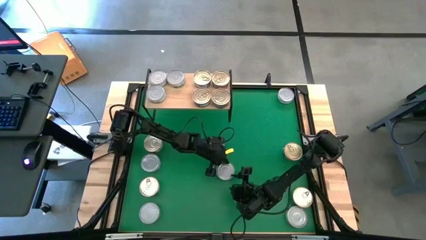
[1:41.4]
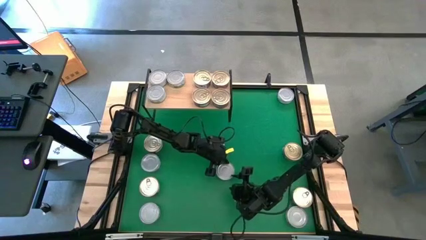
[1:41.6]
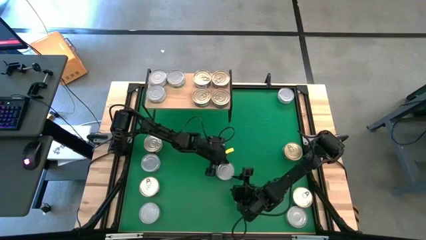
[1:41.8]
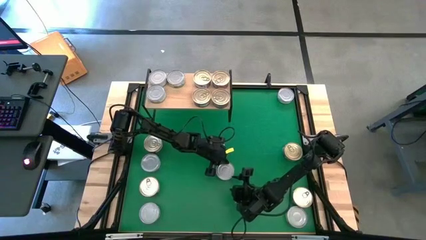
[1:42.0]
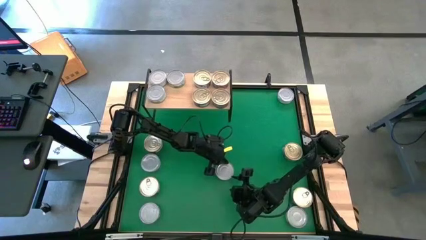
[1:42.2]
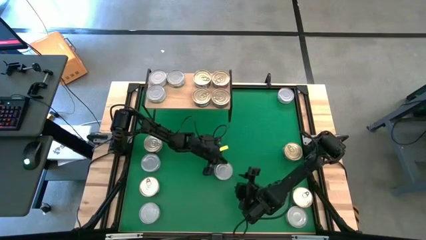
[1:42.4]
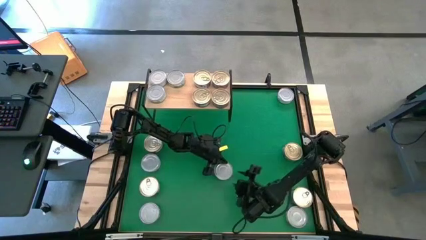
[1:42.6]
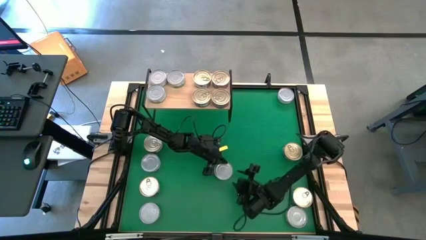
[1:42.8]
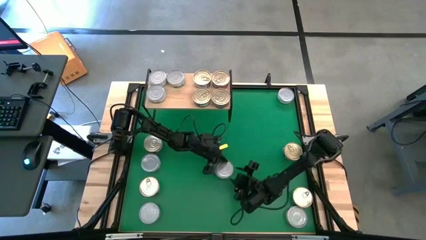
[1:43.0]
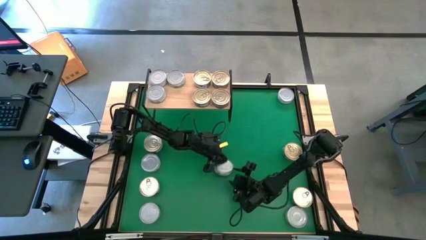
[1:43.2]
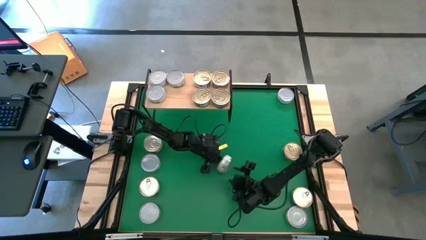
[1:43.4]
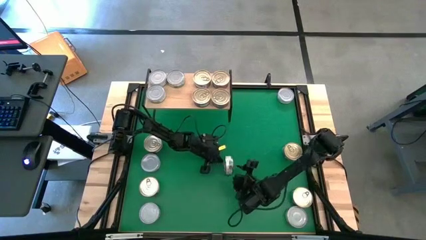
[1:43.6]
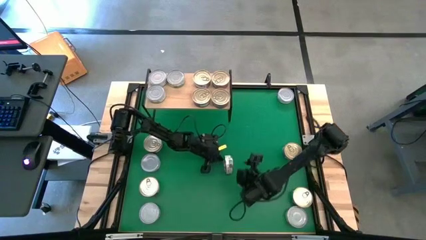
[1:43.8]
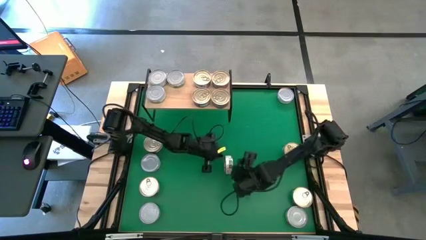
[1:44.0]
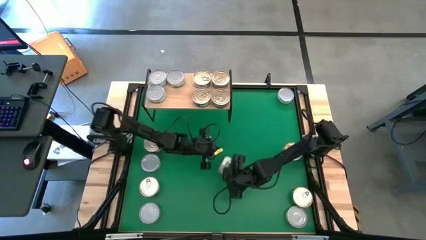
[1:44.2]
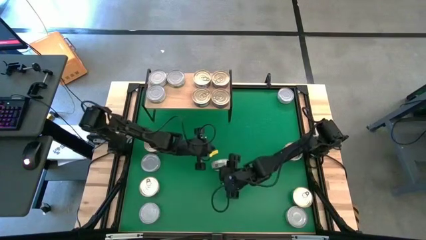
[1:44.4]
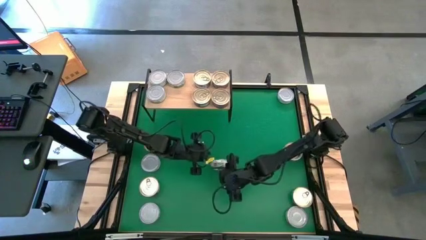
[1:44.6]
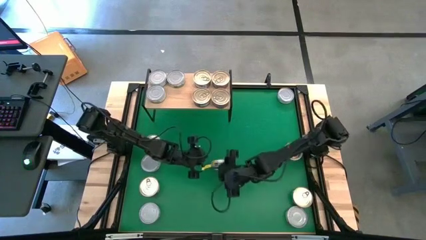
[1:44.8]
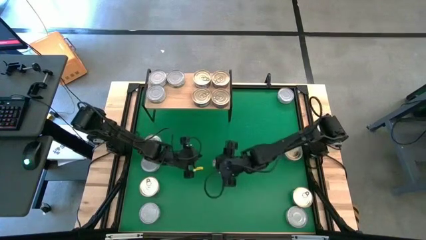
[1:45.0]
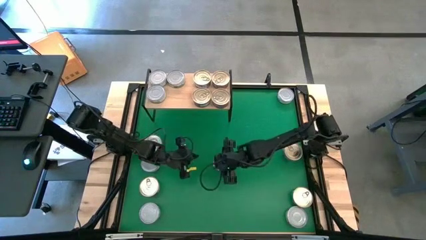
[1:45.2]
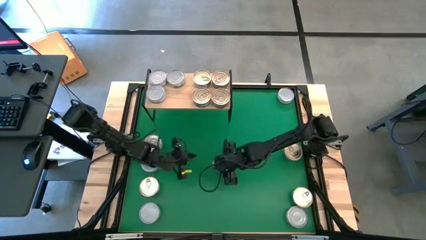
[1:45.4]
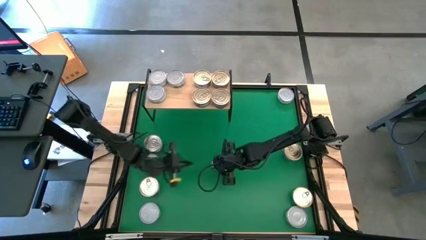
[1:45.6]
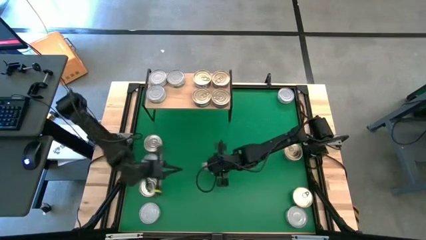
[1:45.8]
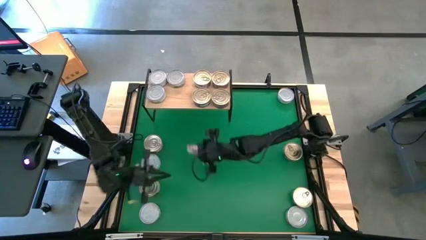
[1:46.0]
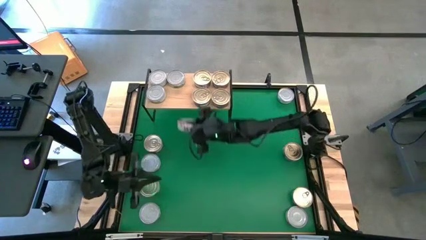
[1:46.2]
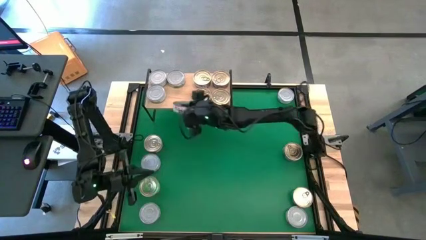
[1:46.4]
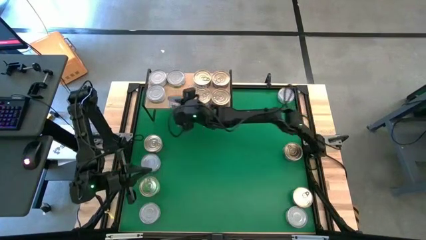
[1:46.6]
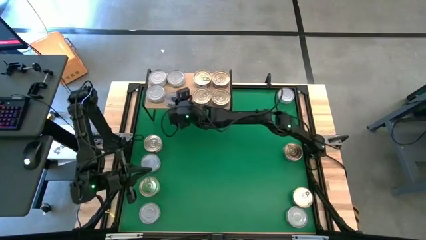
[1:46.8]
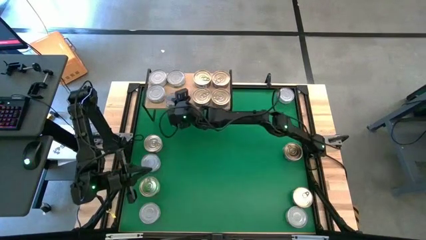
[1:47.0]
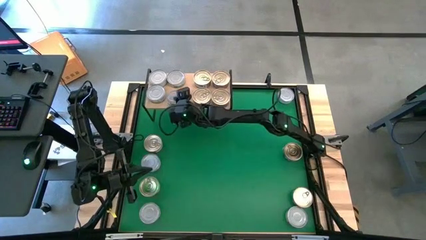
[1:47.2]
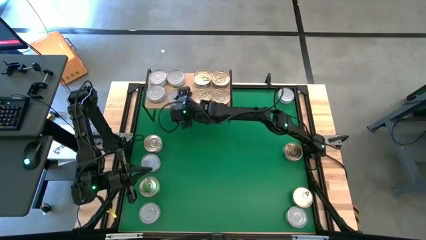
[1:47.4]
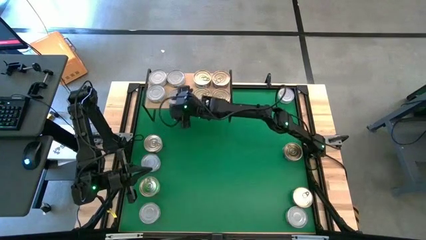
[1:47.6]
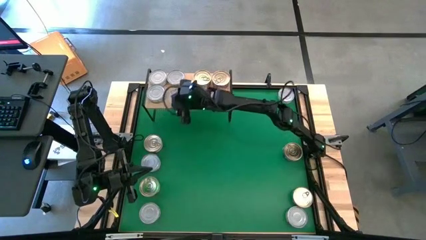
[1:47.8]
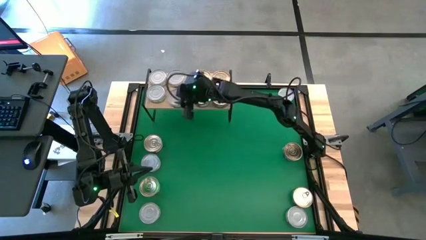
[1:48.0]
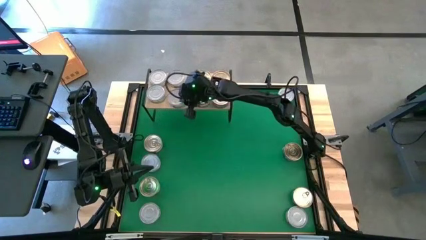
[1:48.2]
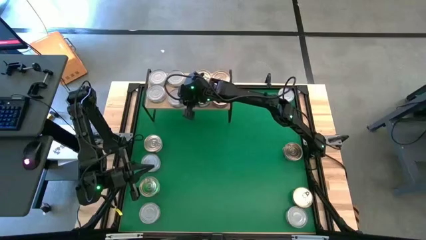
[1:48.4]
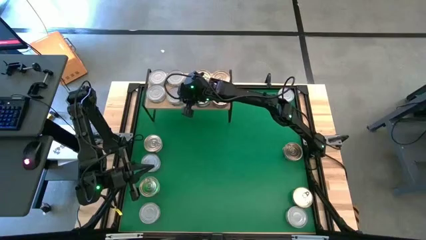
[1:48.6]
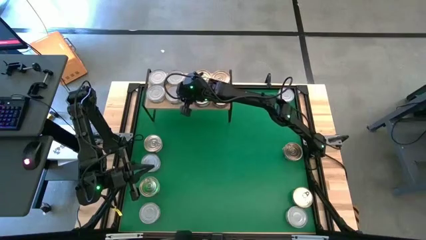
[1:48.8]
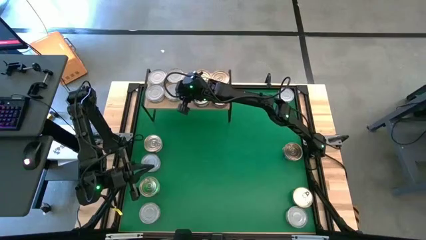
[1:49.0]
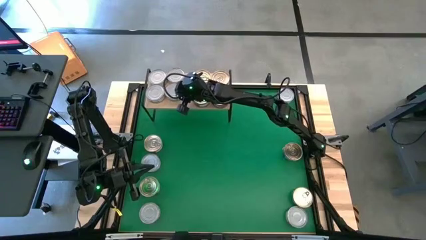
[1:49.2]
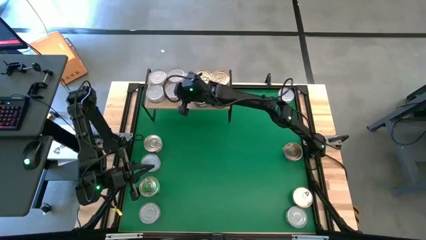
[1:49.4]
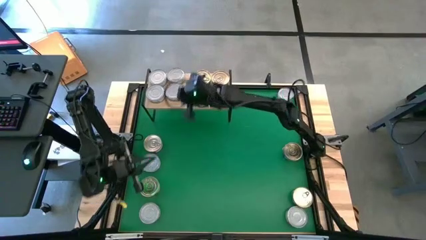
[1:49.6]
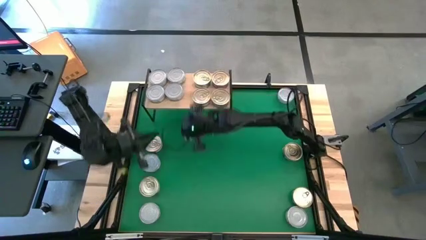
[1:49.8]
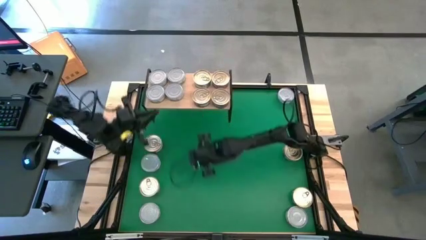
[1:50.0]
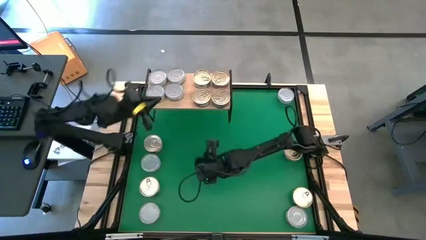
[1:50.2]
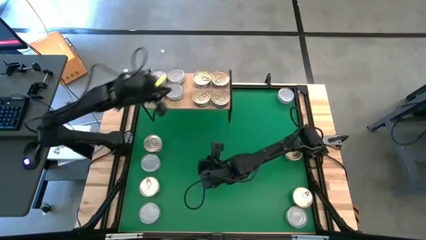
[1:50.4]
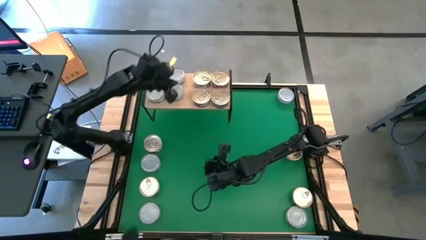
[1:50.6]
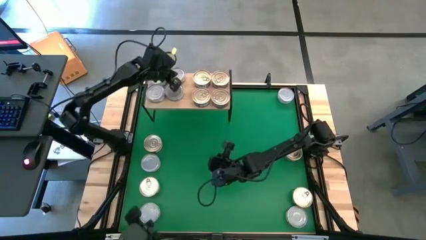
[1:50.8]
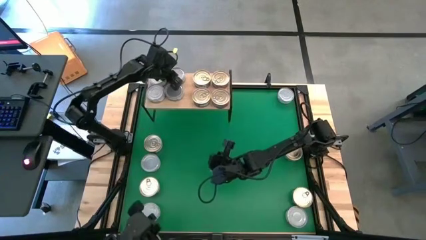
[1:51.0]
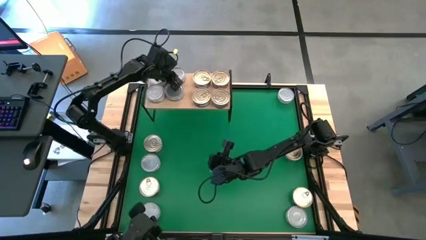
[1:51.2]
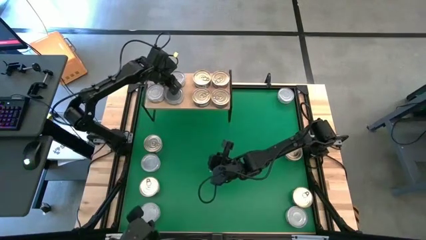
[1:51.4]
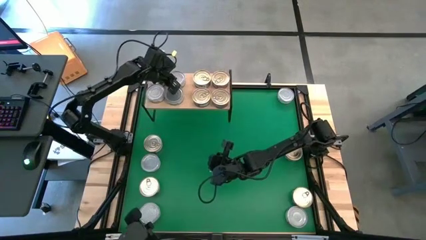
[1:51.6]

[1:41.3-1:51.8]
Task: Stack canned seafood by type on shelf
Put the green tuna can on the shelf

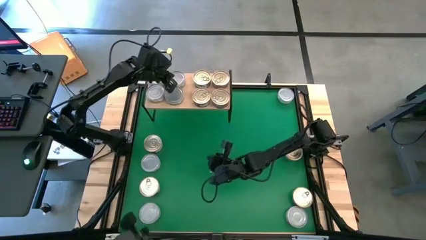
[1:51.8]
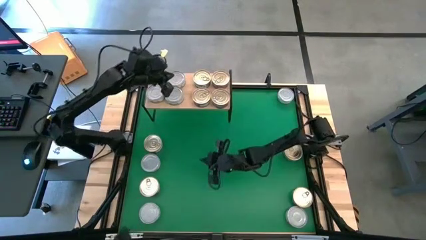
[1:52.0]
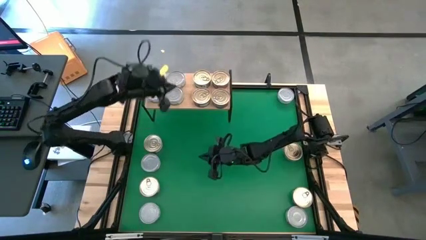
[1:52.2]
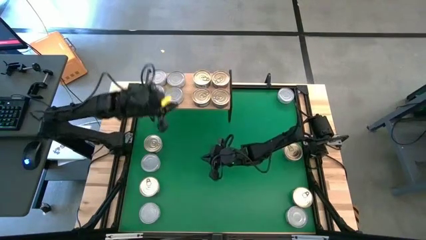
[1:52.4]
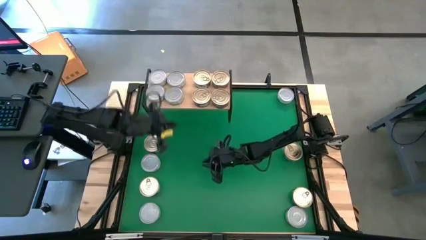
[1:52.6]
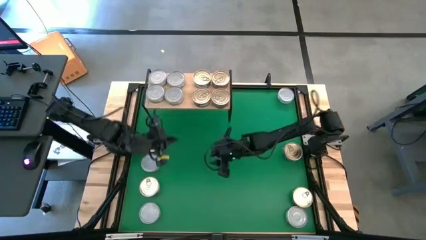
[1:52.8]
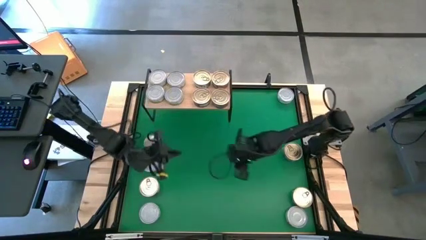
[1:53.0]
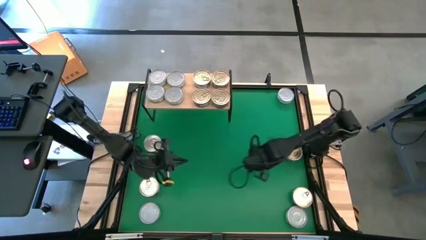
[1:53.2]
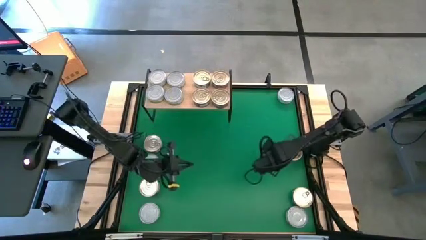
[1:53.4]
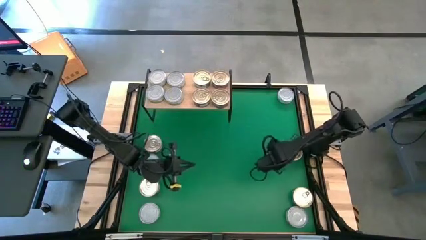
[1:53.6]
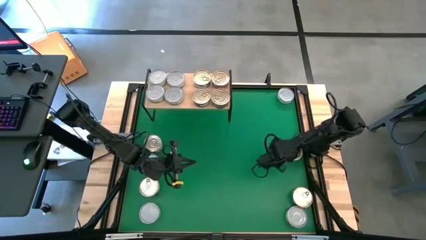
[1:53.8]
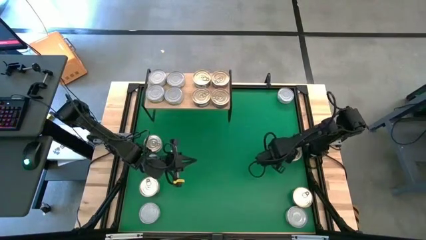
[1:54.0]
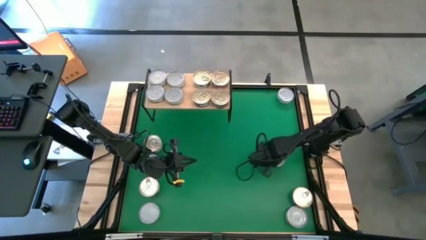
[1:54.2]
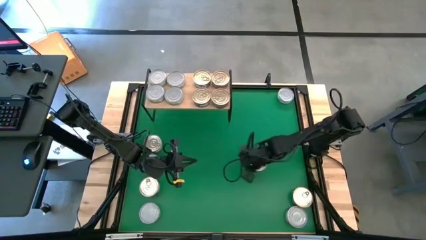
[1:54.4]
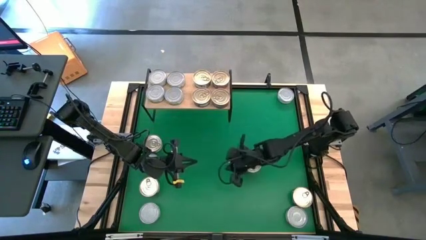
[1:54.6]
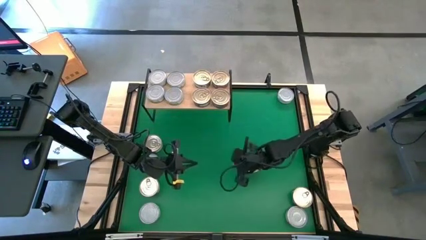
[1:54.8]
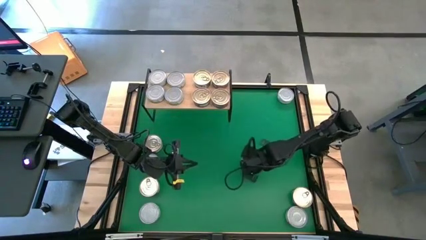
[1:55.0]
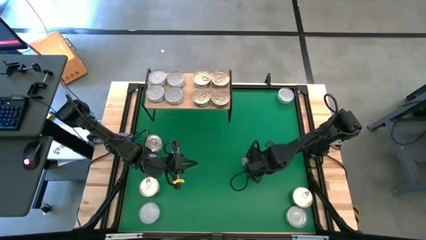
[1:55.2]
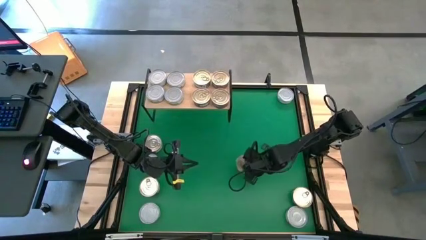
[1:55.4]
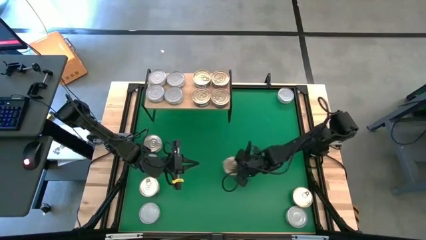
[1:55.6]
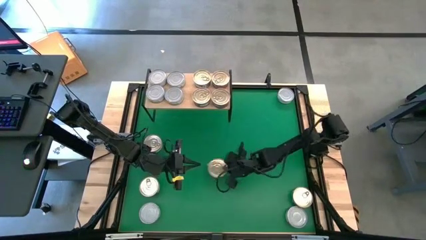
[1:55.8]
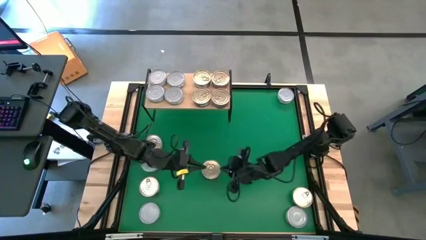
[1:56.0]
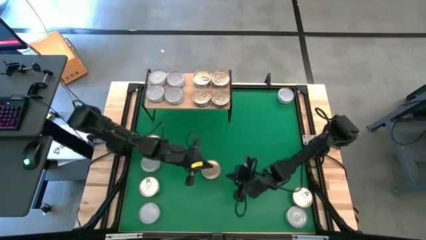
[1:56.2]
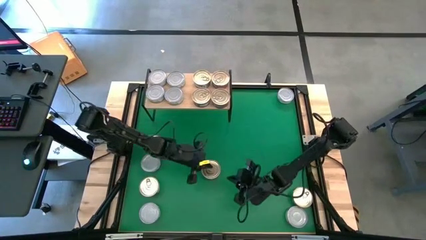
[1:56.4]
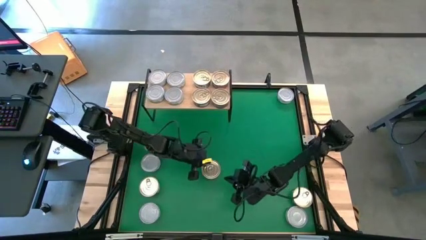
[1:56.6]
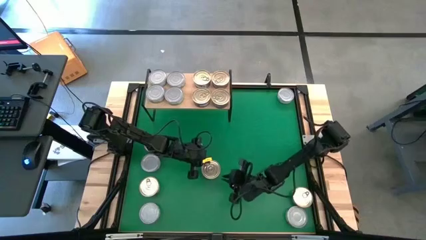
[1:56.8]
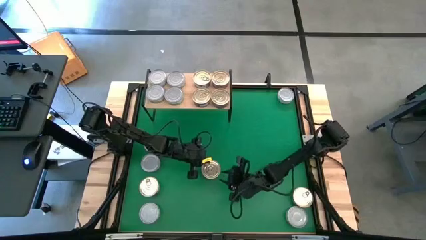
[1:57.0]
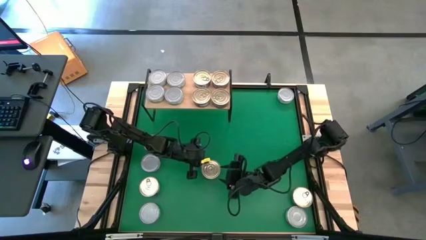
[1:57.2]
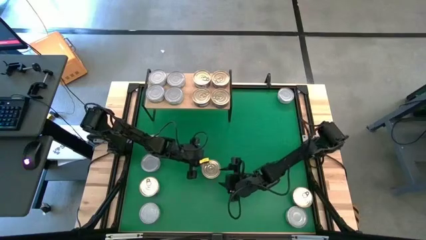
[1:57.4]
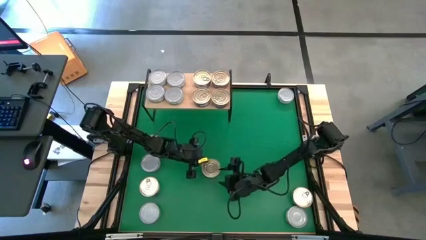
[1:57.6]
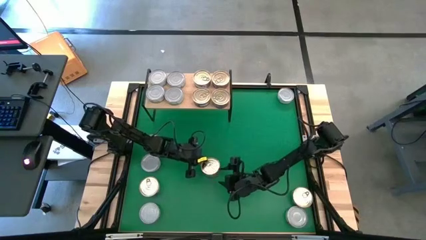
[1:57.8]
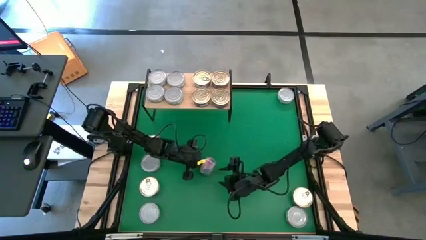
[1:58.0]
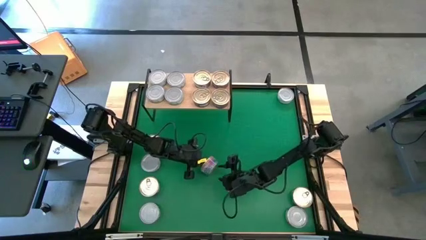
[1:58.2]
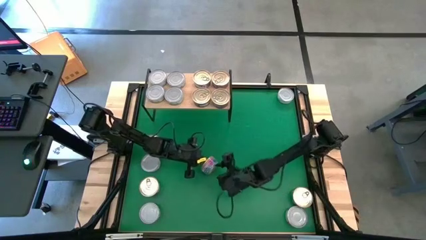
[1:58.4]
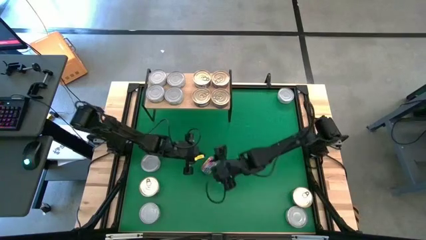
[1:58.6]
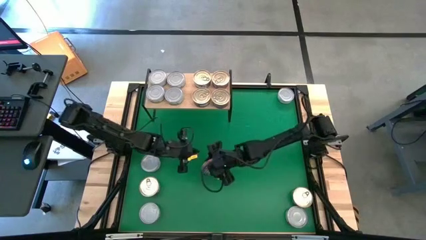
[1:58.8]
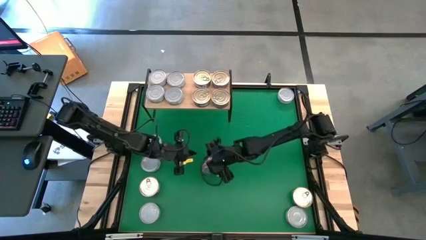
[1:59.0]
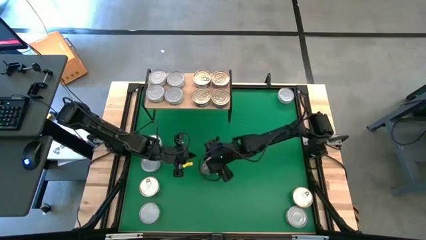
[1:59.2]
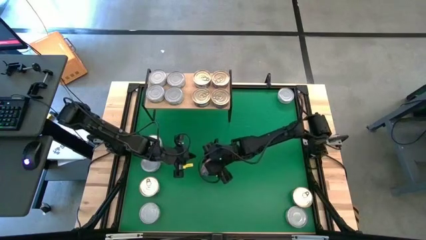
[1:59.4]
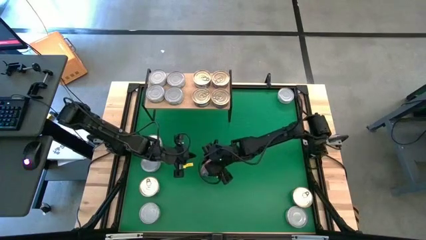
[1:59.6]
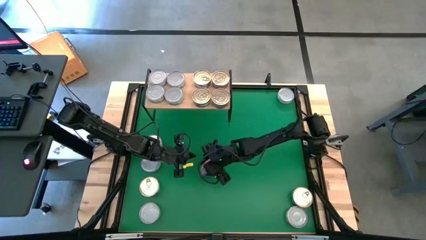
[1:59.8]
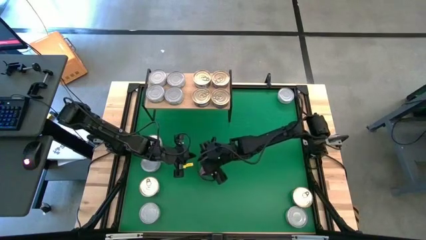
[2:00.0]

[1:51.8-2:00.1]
Stack the blue-pink tuna can on top of the other blue-pink tuna can on the shelf
